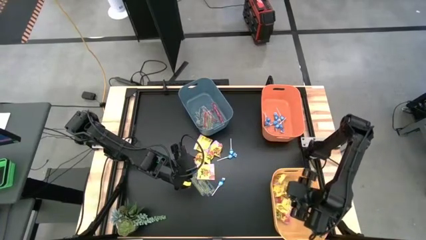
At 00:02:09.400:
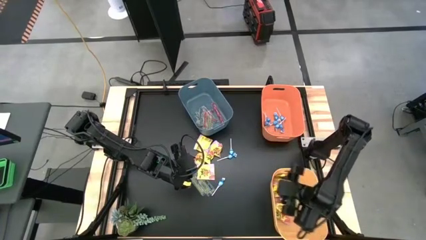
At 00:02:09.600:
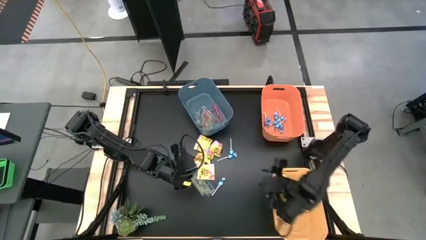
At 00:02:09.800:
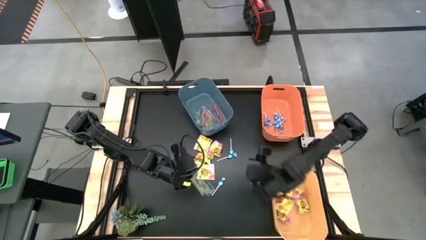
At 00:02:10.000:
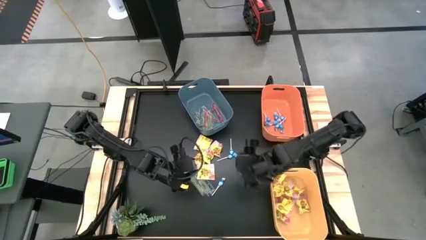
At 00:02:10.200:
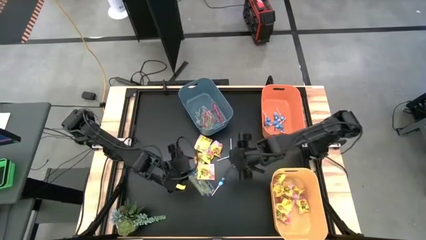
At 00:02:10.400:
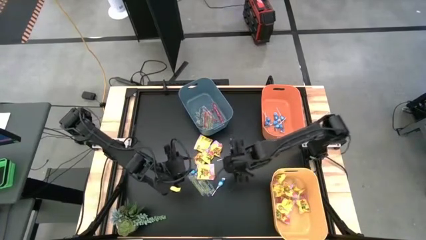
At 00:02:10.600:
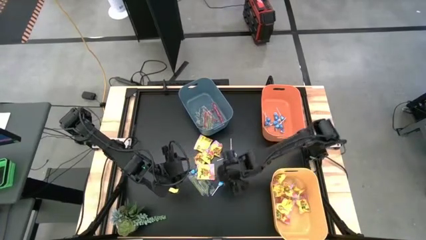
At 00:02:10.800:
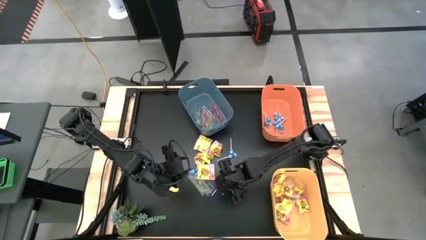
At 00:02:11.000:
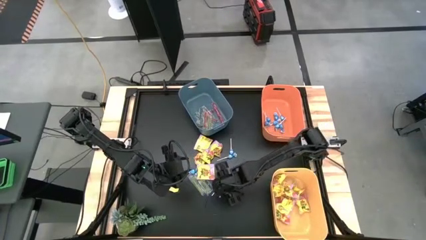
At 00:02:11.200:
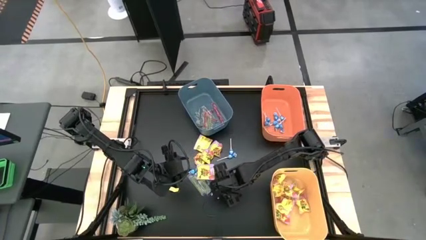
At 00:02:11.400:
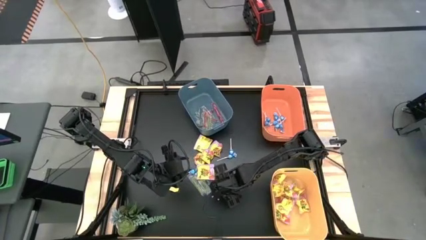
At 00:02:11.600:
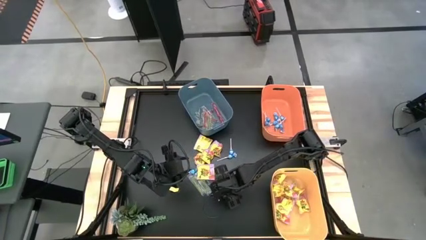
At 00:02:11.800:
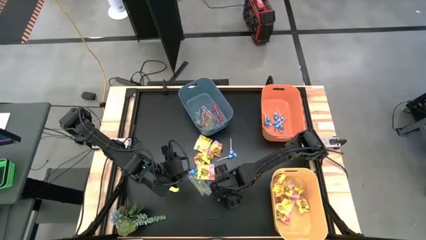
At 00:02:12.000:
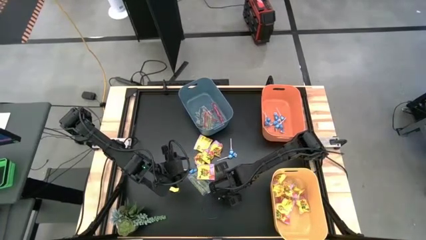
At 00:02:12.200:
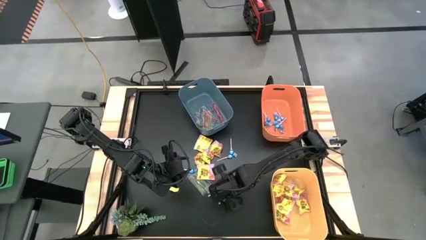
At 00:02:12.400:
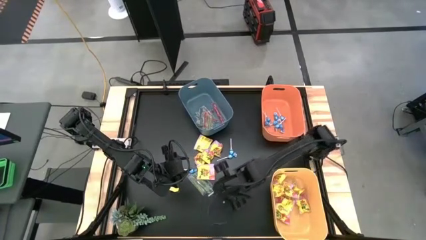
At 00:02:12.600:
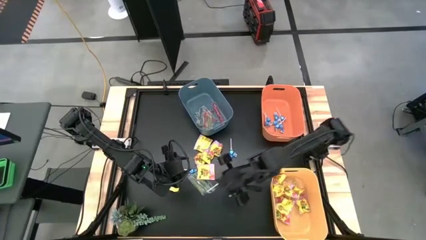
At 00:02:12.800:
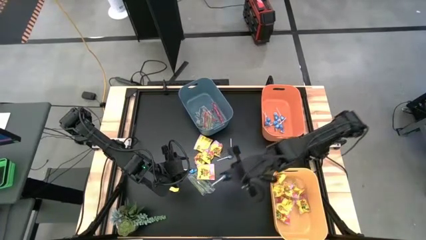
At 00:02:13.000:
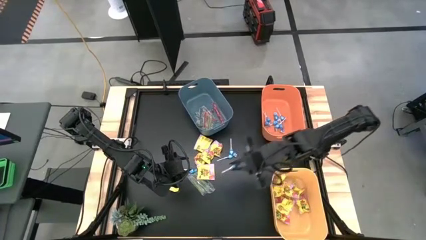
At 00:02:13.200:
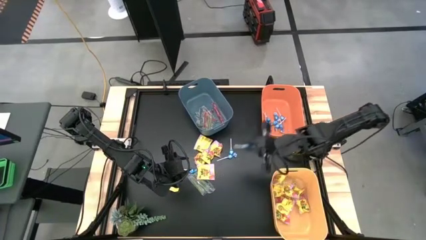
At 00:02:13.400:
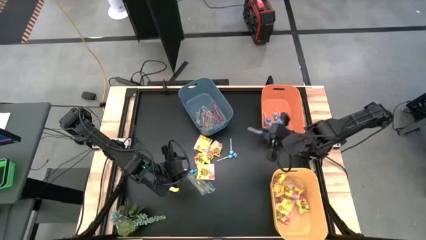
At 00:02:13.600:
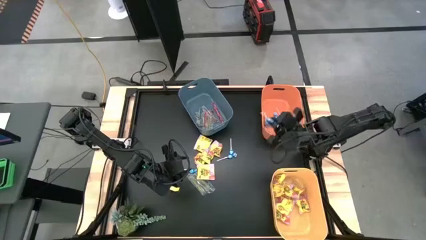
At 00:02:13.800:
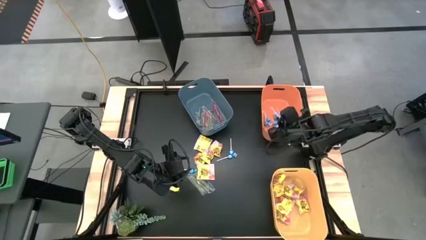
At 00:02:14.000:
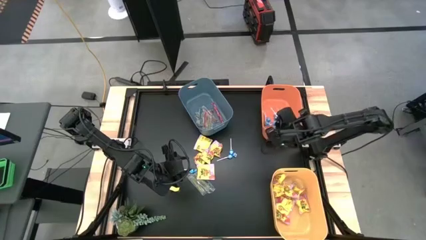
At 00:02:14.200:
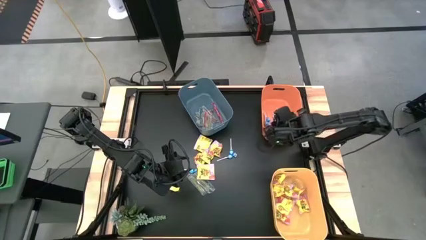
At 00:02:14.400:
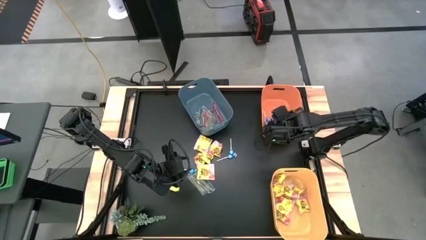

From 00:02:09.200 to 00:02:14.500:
Task: Sort candy
Put the blue candy into the orange bin

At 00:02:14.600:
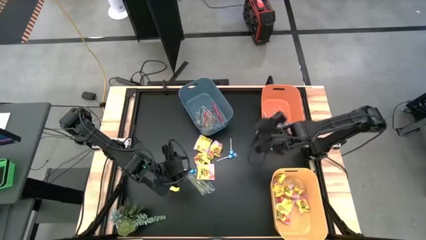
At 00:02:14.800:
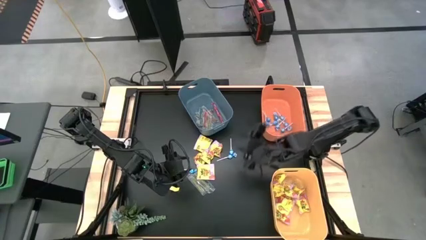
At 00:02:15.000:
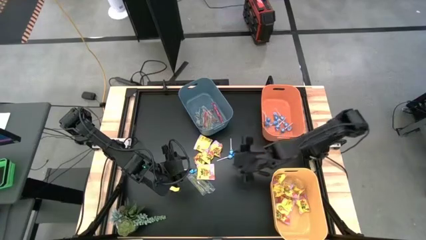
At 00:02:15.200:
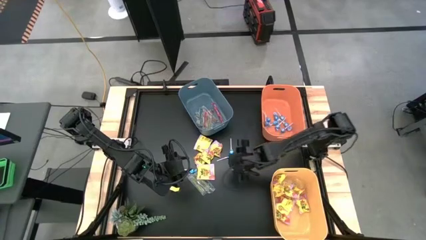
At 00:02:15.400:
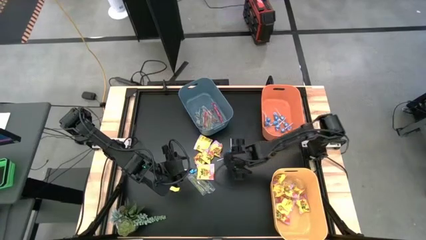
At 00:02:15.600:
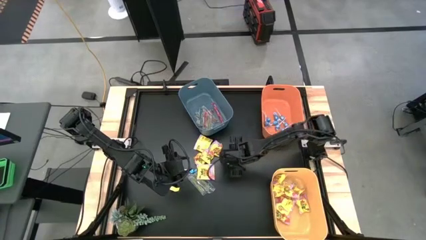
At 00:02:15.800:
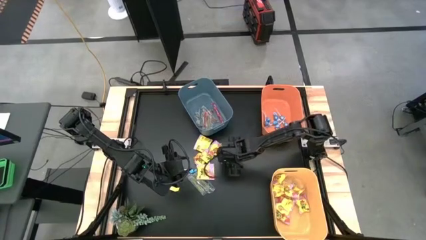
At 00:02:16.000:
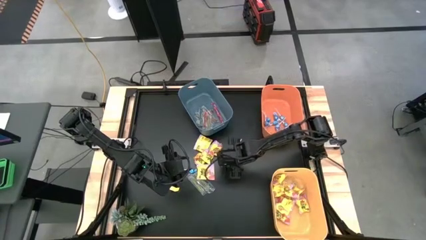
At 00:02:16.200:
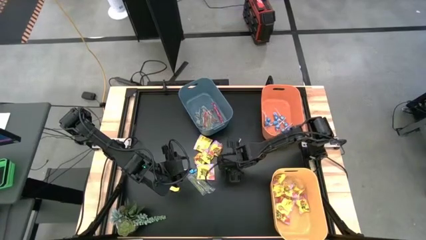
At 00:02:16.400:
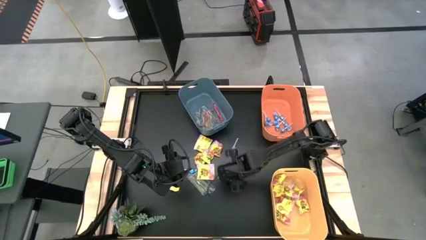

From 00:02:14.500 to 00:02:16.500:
Put the blue candy into the orange bin

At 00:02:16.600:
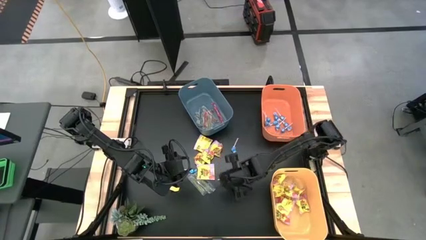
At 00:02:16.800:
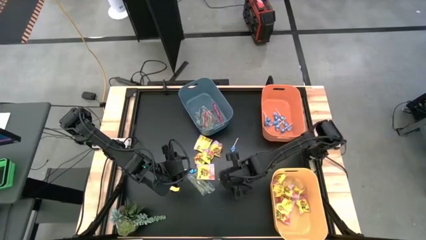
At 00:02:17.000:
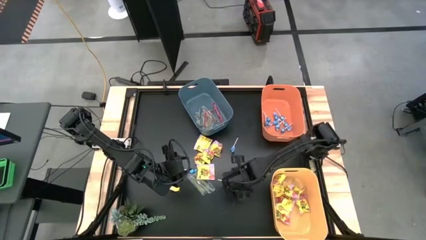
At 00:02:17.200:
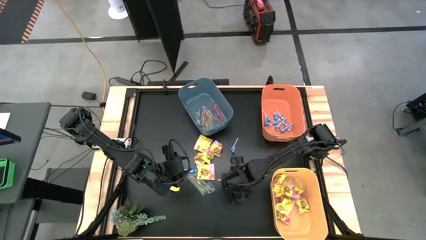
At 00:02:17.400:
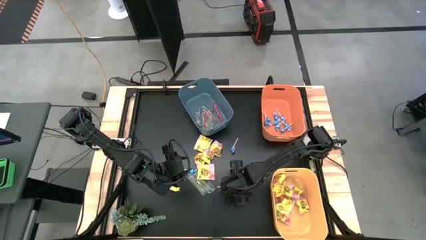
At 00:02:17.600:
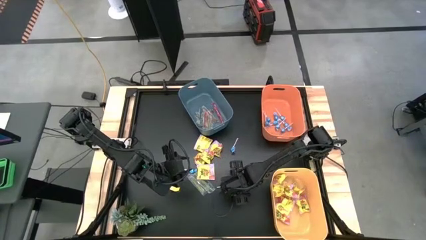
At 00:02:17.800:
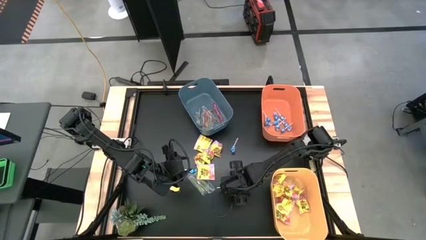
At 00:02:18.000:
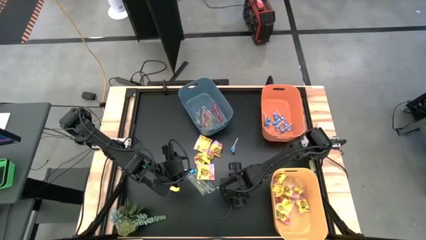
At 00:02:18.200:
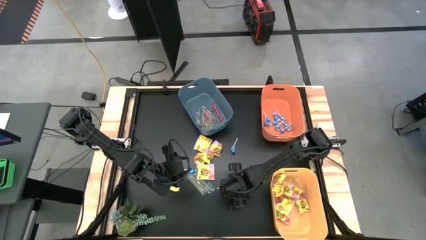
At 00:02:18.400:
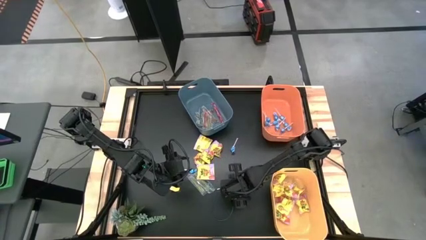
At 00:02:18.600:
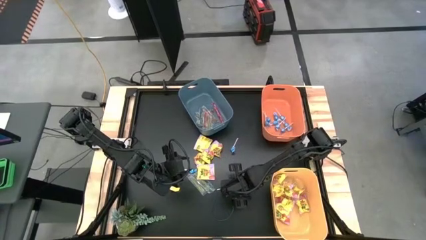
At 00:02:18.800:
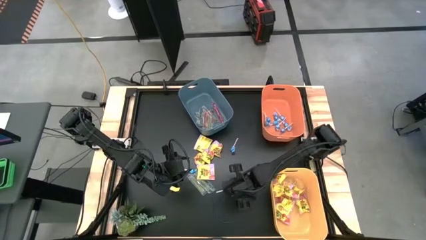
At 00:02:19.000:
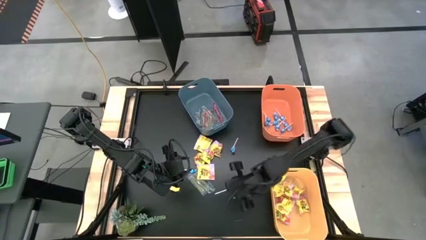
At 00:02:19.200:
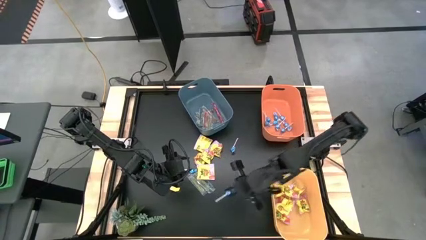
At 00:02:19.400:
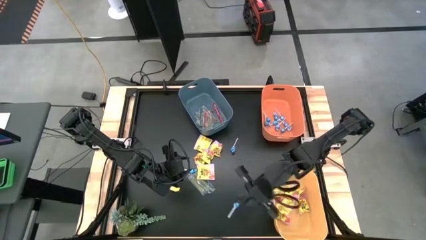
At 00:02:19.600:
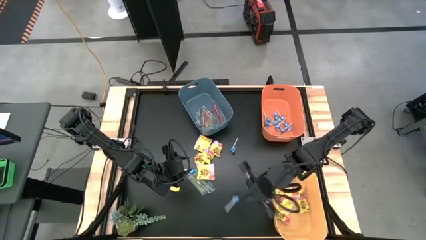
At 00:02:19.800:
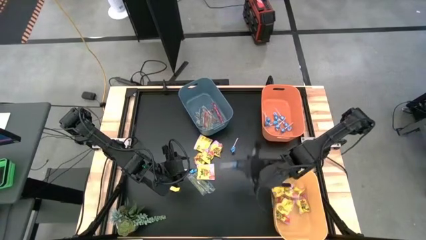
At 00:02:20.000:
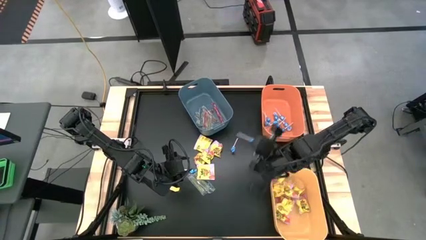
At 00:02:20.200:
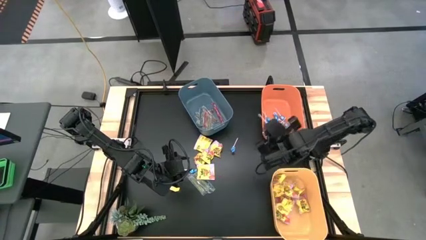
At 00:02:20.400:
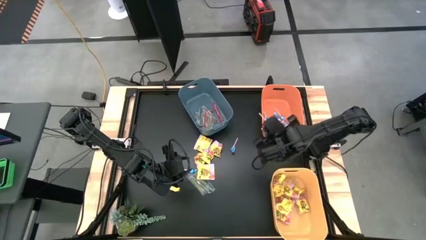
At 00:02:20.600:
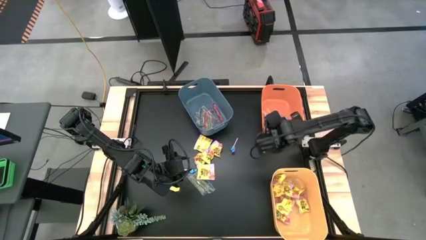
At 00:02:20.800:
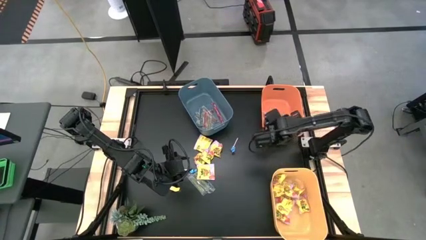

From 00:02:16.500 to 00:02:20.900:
Put the blue candy into the orange bin

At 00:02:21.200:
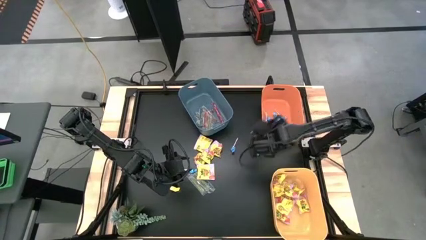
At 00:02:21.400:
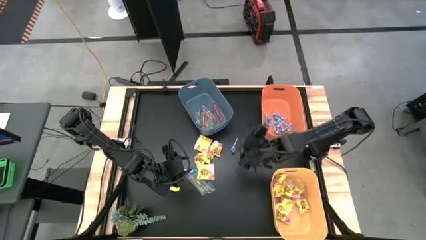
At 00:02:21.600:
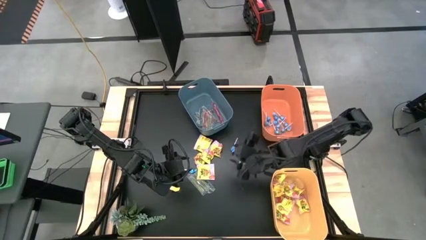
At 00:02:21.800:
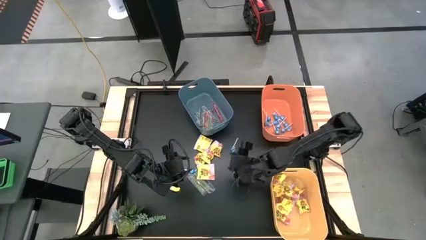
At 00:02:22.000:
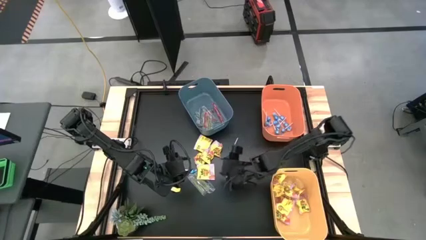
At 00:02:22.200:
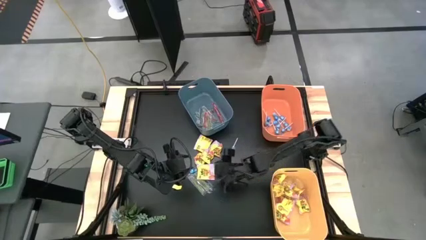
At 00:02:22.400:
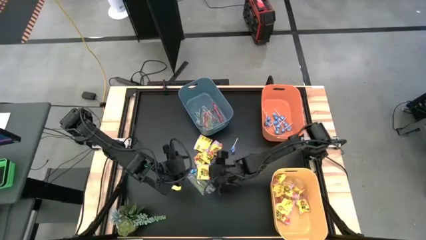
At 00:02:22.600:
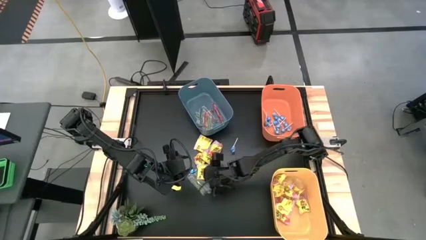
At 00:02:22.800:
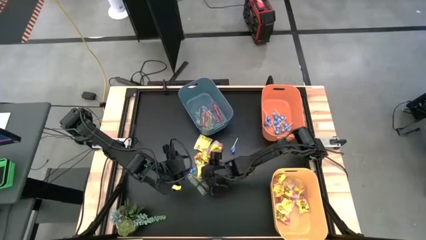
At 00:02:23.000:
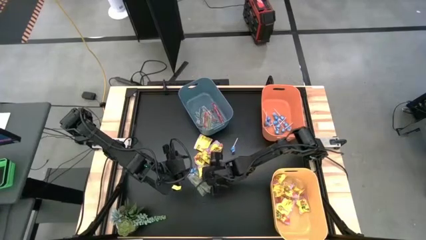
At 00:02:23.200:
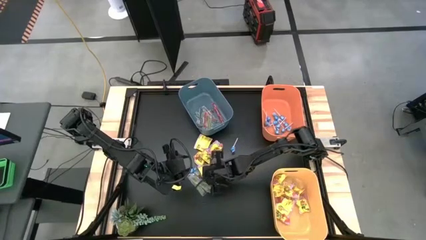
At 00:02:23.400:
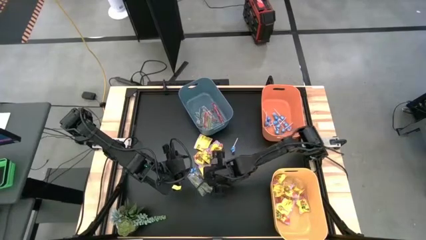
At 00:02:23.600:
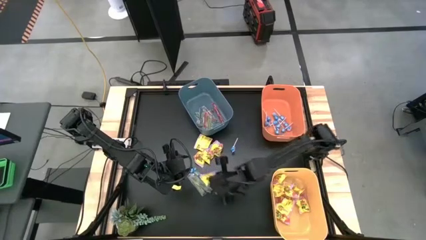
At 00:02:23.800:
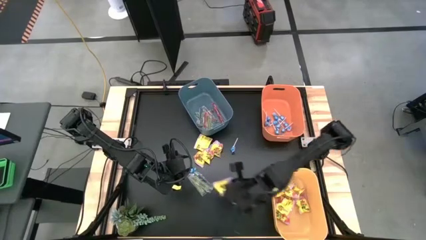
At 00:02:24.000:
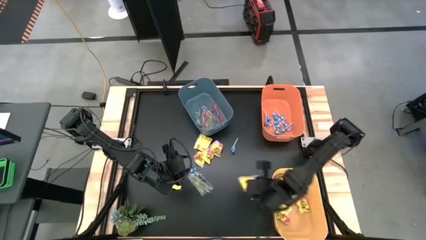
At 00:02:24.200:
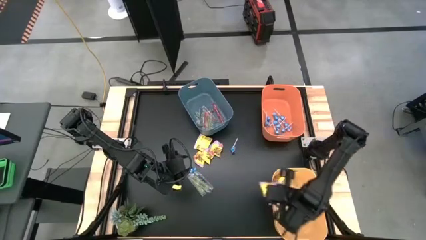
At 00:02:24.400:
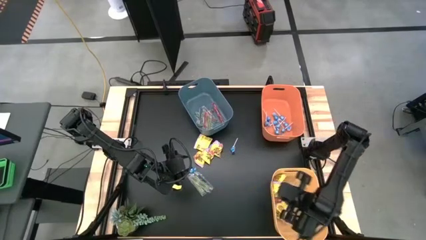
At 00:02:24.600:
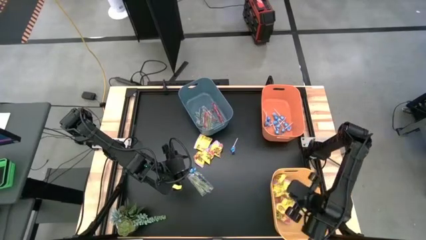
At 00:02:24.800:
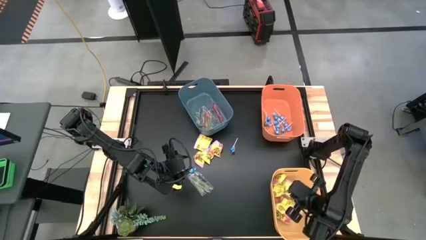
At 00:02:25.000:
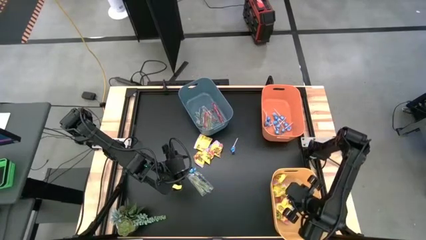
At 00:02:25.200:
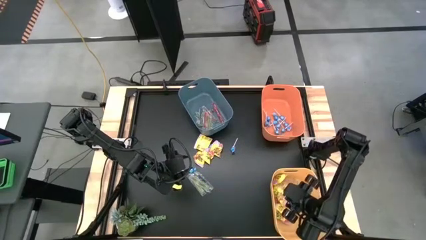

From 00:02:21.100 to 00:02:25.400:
Put the yellow candy into the yellow bin
